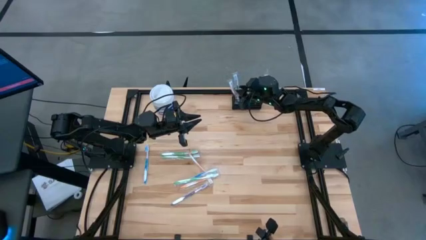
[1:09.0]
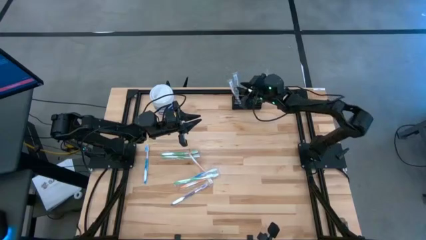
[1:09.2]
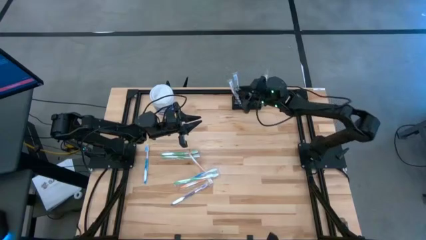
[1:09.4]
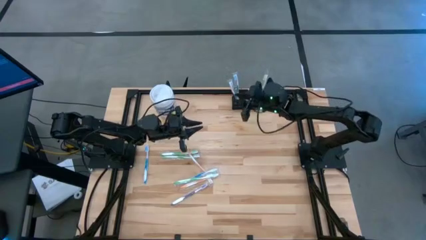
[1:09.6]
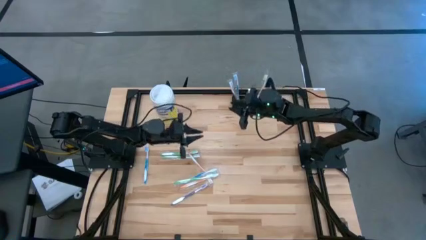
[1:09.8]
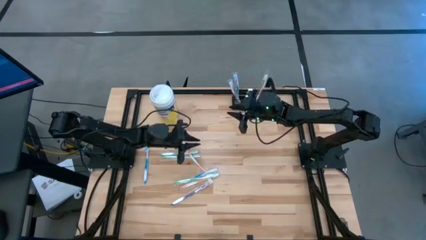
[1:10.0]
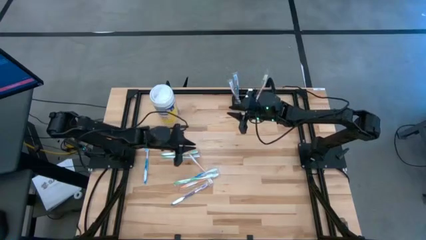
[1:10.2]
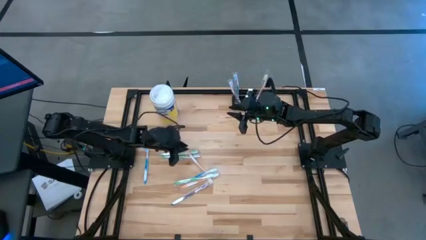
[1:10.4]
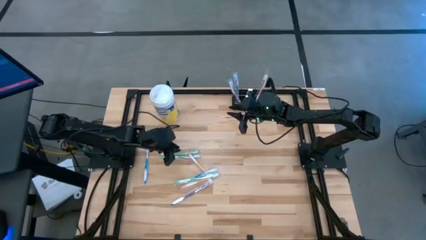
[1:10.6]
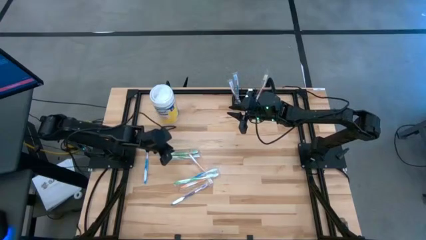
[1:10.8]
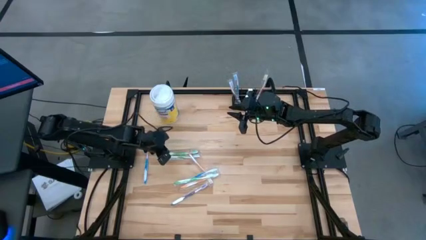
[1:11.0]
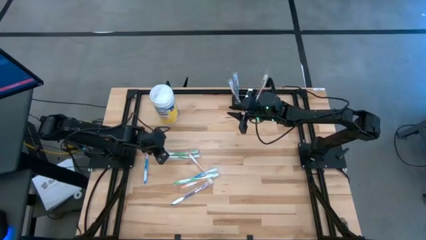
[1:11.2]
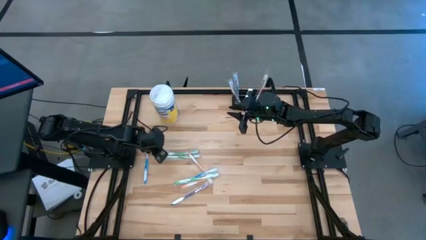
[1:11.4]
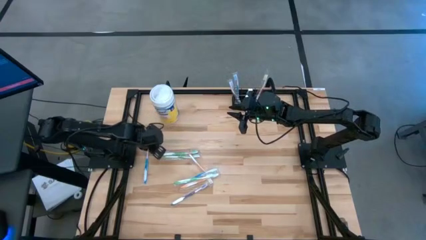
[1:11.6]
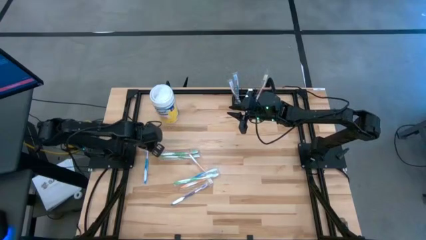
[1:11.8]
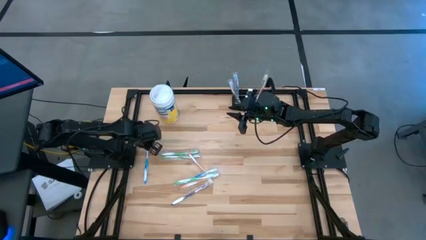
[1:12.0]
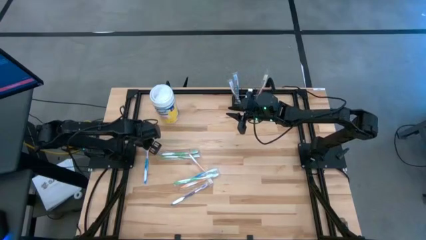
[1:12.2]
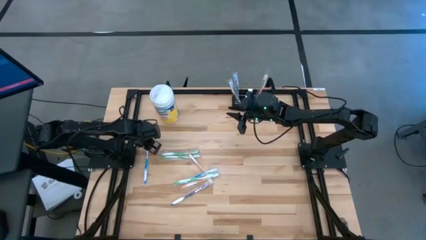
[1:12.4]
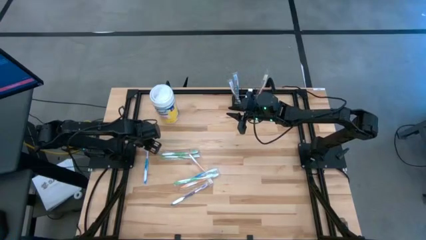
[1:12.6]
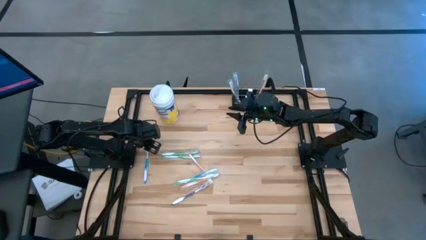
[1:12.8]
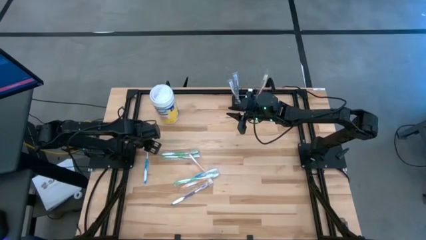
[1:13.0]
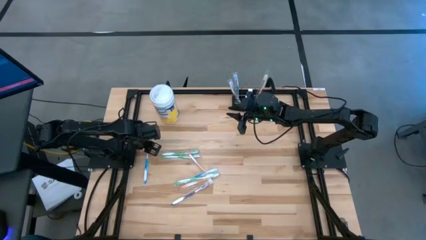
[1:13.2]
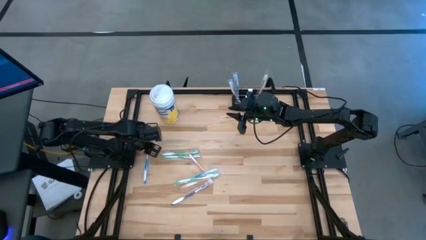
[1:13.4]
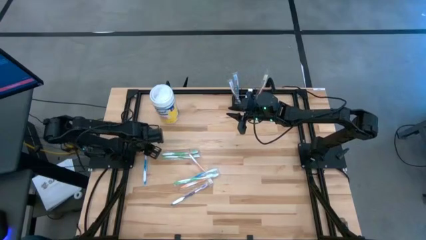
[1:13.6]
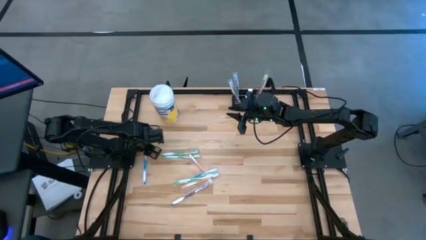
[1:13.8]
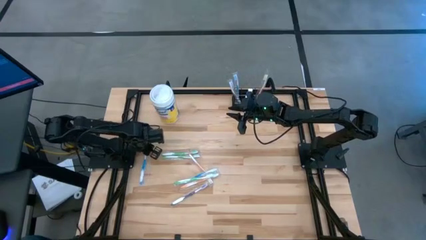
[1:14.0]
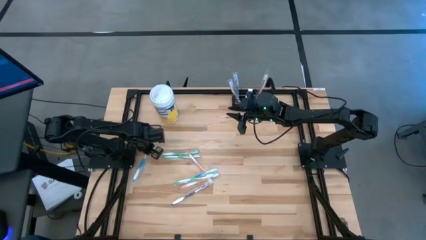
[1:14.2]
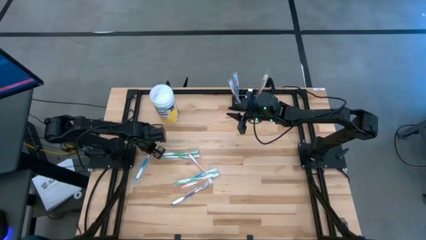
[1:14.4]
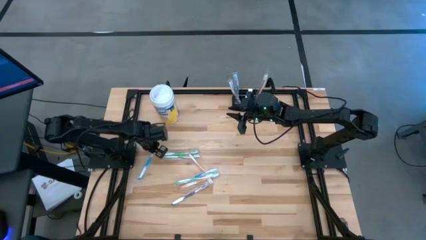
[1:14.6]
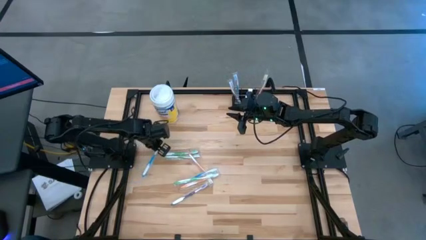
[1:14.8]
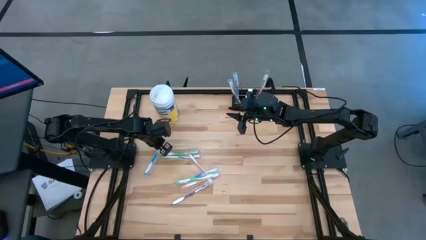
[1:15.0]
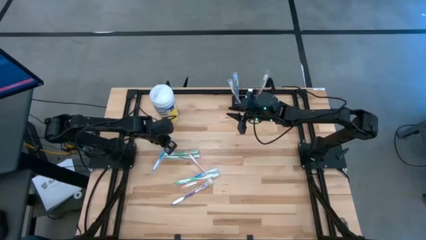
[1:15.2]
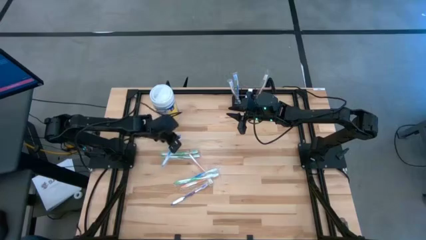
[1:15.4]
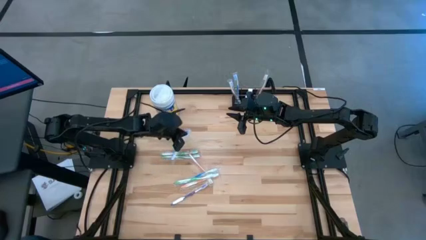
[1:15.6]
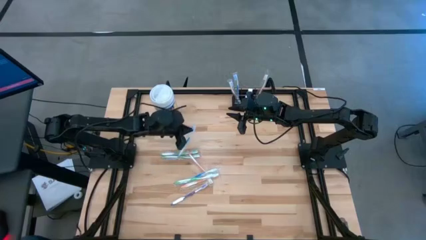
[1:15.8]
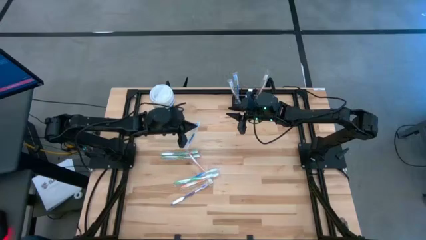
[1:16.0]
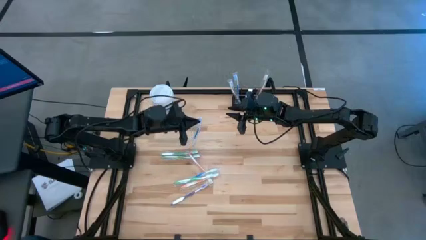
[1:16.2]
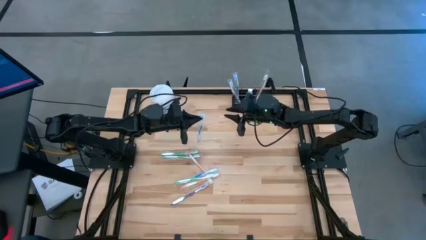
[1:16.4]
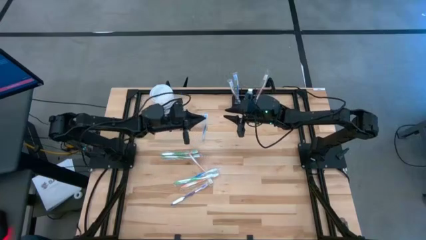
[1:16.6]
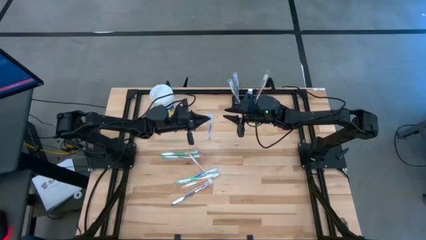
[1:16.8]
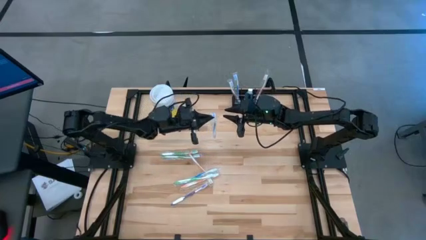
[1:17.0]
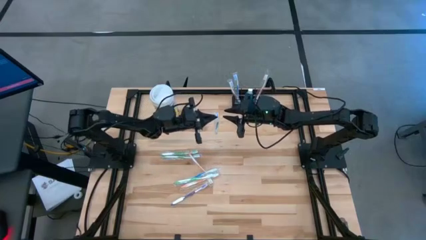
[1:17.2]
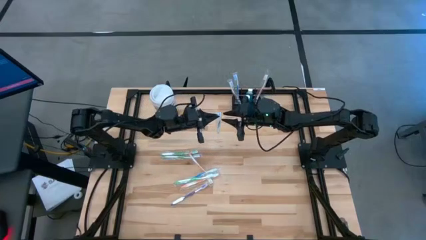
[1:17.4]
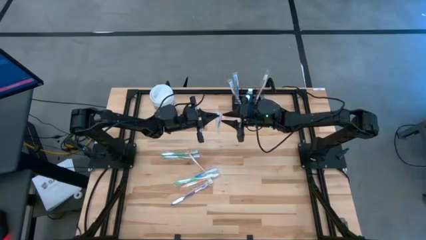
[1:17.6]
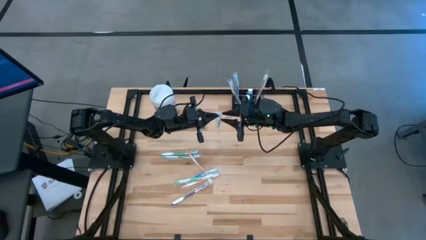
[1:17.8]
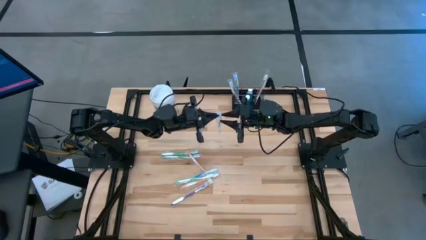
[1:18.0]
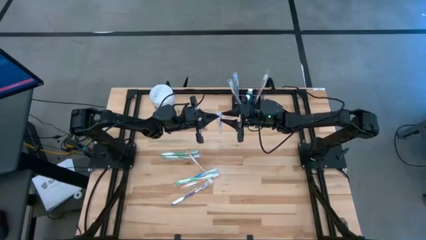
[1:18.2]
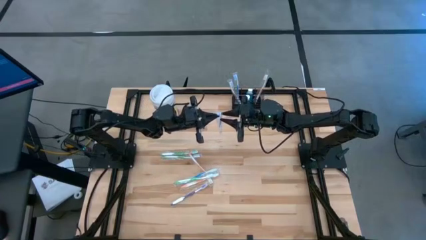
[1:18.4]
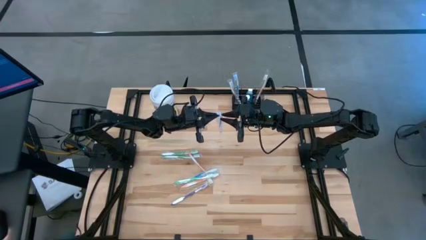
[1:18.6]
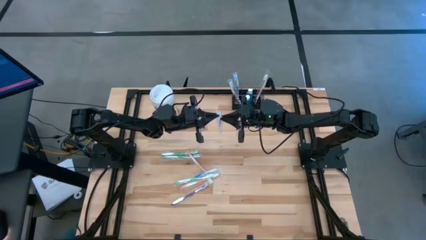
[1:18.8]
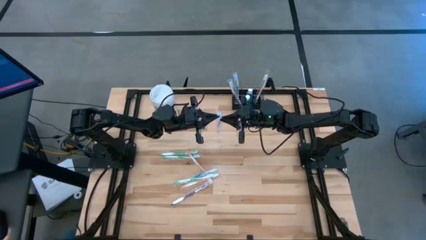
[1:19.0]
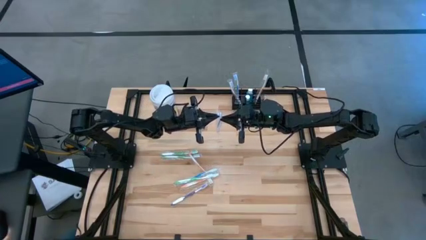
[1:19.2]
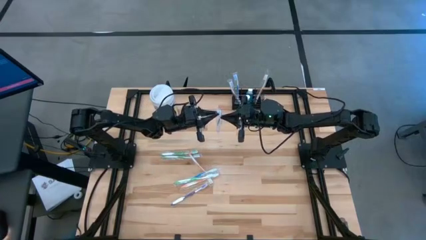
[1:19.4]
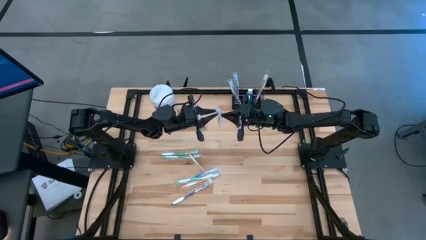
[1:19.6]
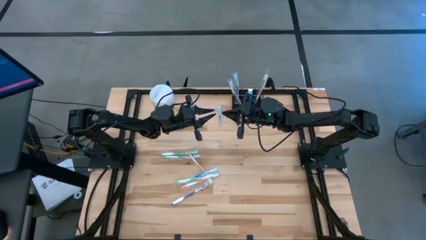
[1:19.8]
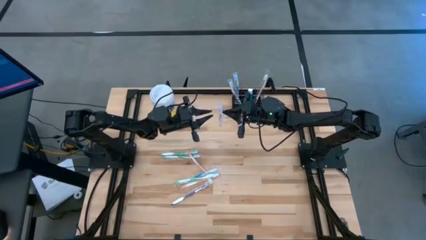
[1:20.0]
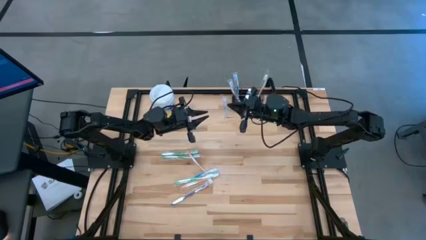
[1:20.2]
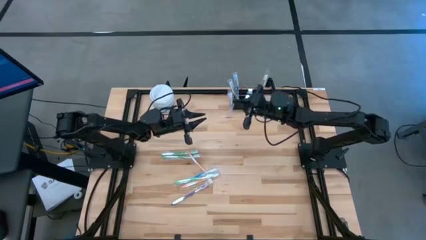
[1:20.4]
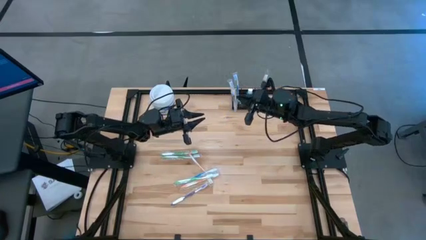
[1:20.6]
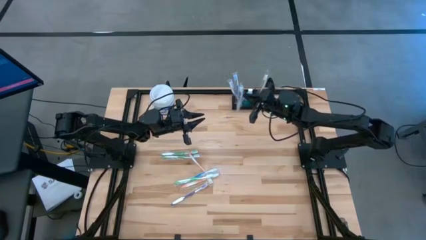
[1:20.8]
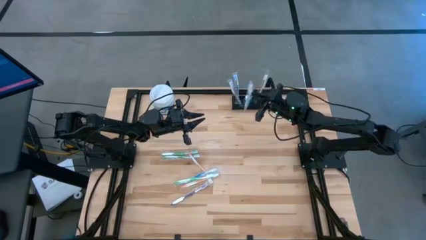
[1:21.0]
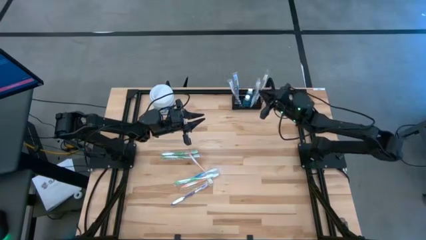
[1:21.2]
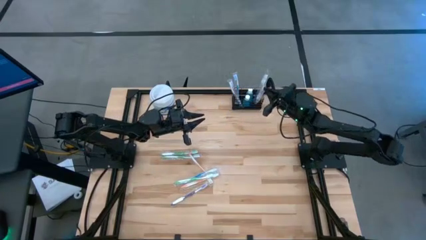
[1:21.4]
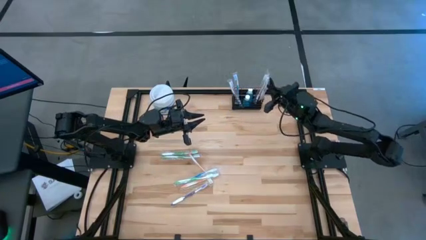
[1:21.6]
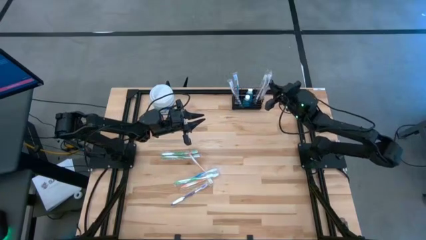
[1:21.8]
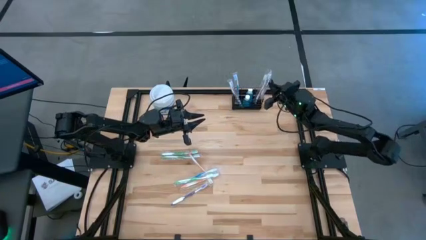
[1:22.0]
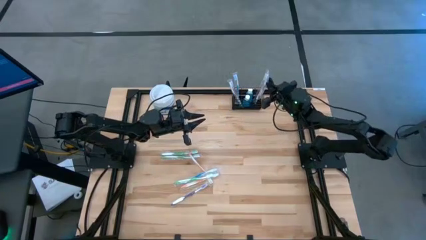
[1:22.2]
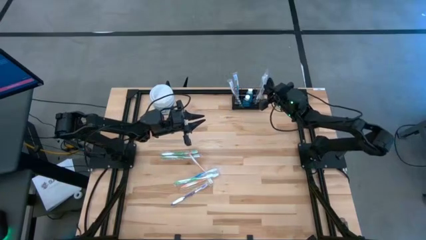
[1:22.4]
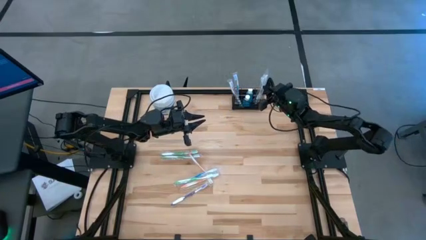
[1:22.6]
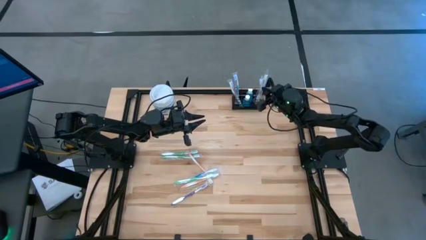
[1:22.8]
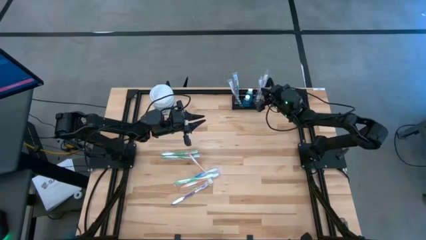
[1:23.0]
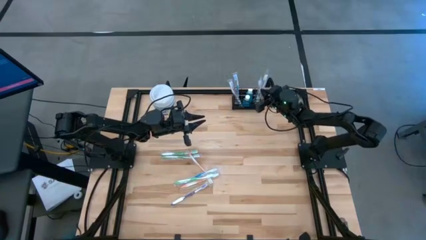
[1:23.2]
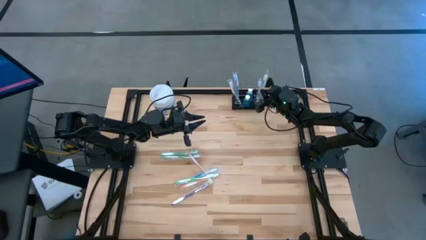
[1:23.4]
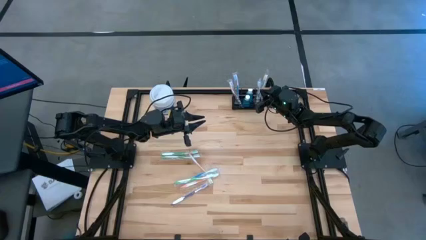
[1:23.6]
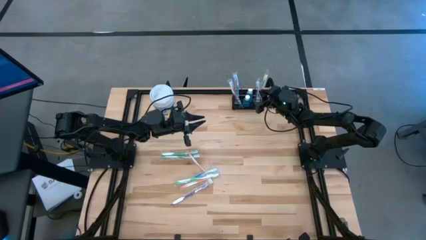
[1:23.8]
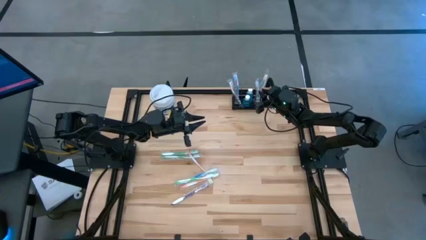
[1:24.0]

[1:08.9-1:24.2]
Task: Pick & Place toothbrushing station
Put the blue toothbrush into the black mesh organizer
